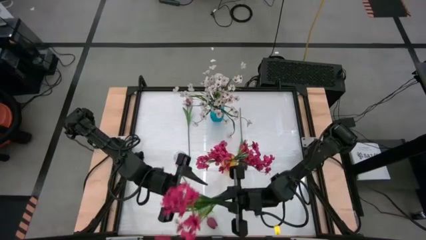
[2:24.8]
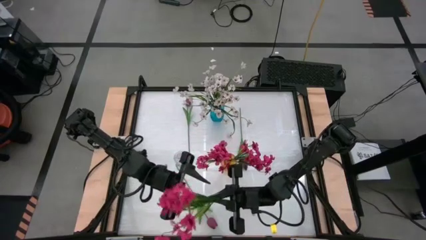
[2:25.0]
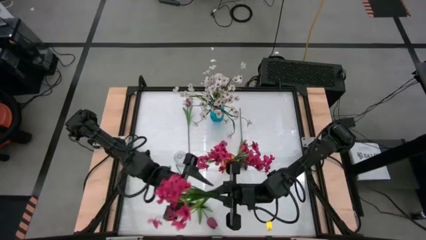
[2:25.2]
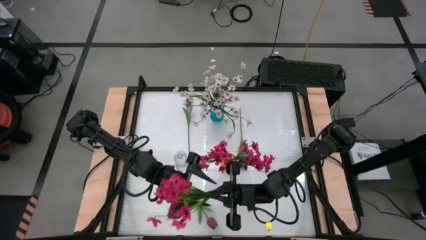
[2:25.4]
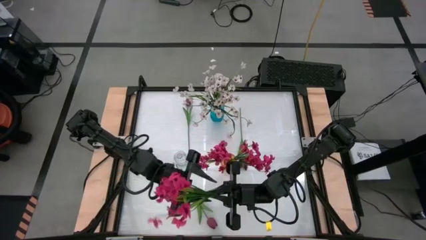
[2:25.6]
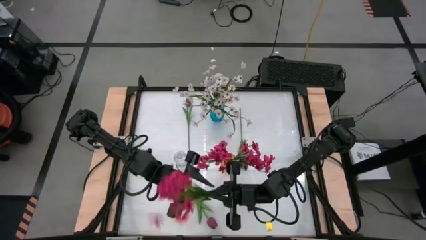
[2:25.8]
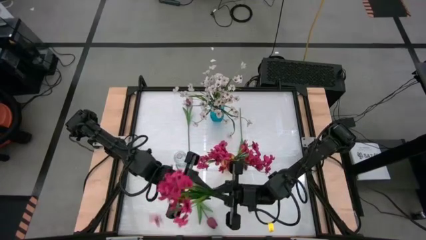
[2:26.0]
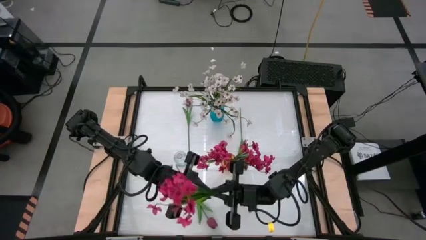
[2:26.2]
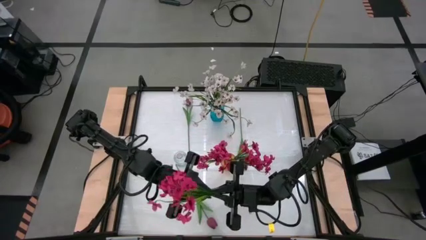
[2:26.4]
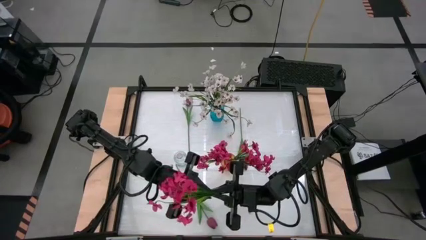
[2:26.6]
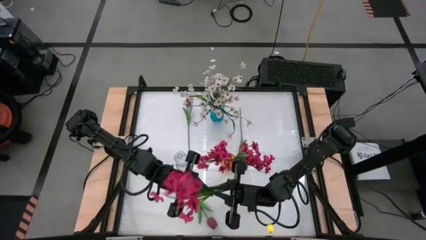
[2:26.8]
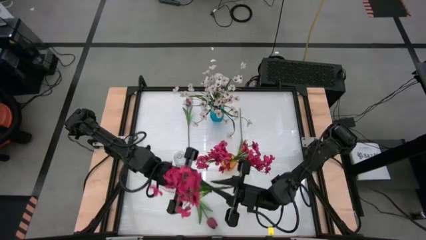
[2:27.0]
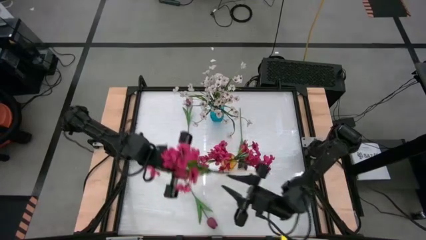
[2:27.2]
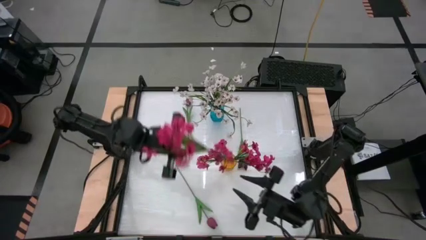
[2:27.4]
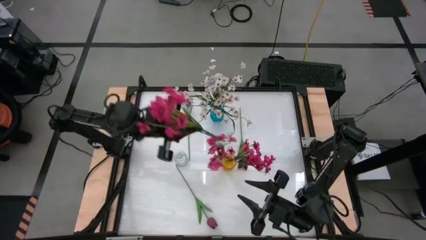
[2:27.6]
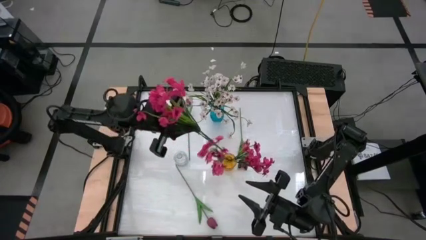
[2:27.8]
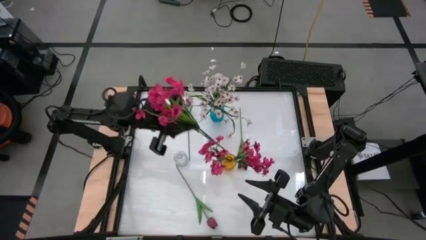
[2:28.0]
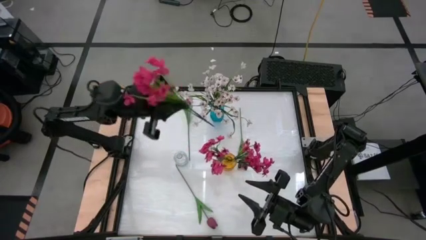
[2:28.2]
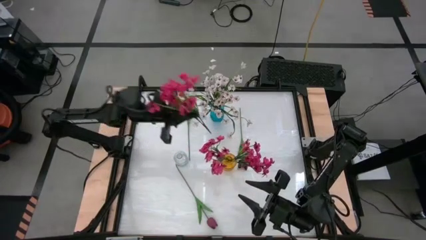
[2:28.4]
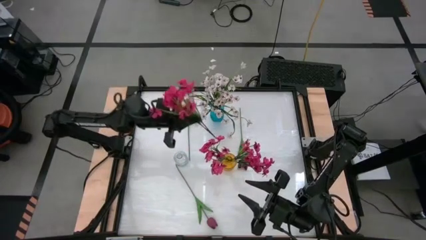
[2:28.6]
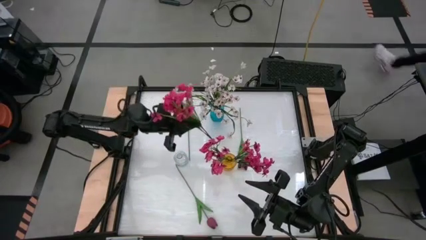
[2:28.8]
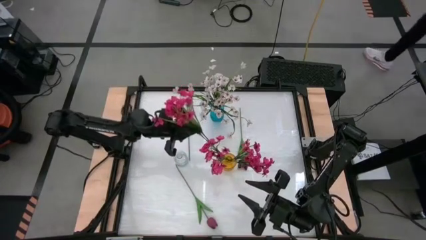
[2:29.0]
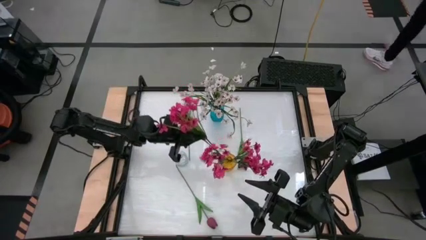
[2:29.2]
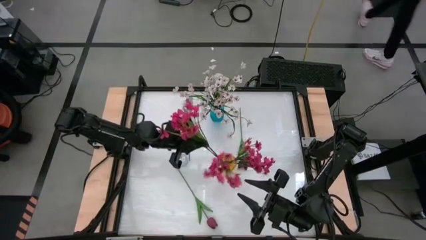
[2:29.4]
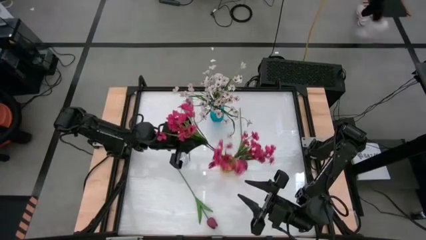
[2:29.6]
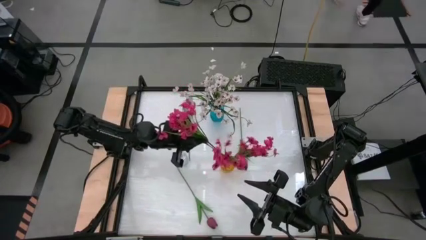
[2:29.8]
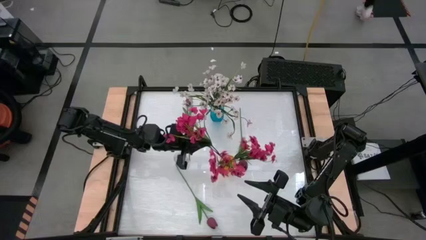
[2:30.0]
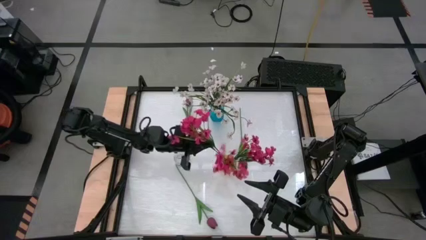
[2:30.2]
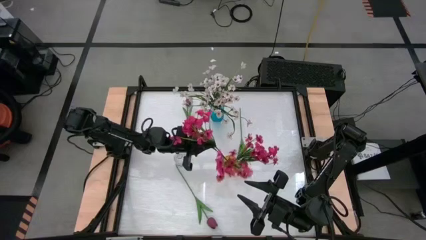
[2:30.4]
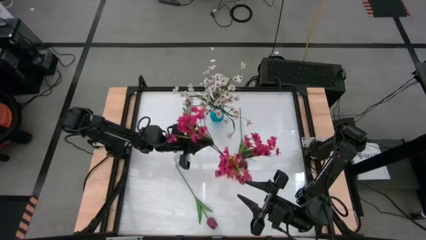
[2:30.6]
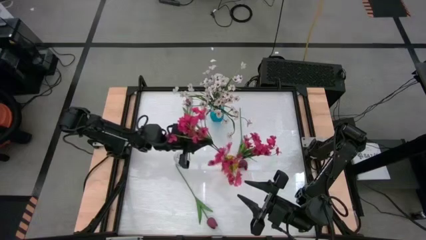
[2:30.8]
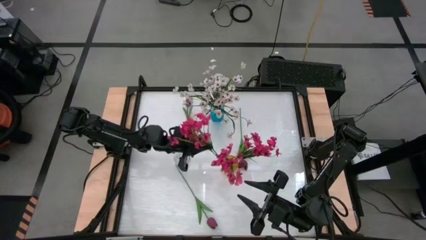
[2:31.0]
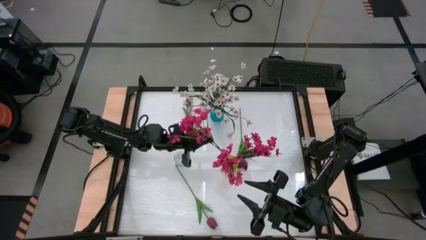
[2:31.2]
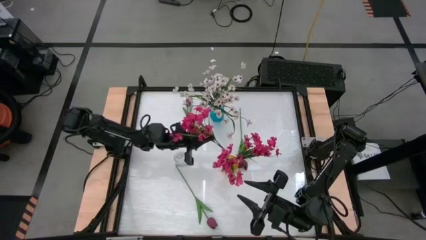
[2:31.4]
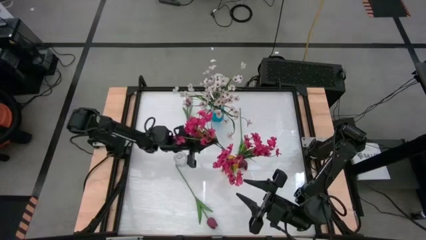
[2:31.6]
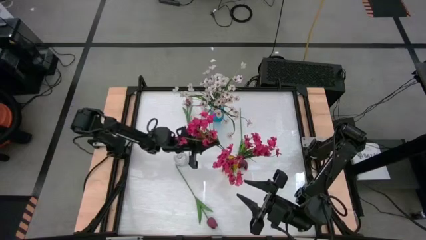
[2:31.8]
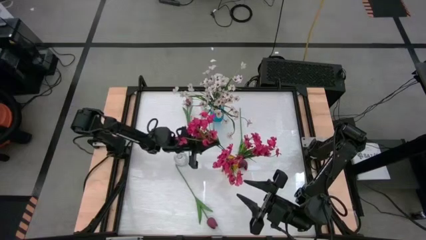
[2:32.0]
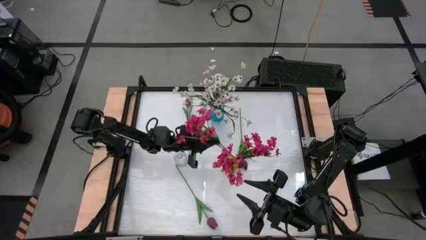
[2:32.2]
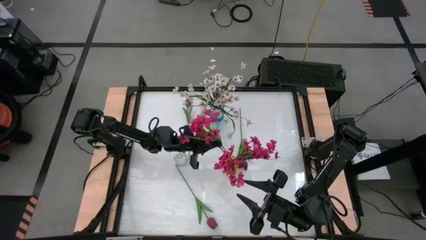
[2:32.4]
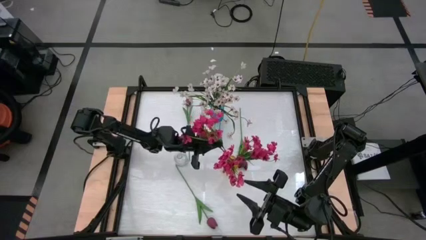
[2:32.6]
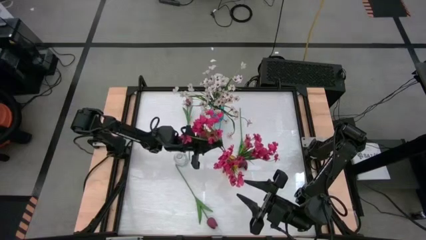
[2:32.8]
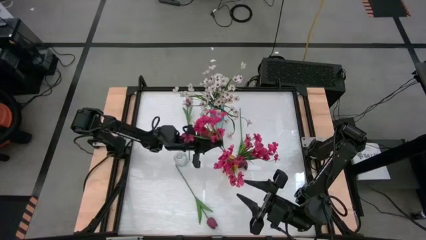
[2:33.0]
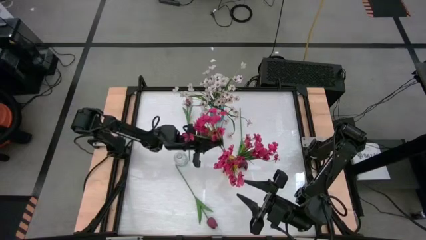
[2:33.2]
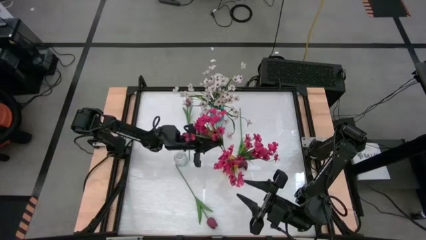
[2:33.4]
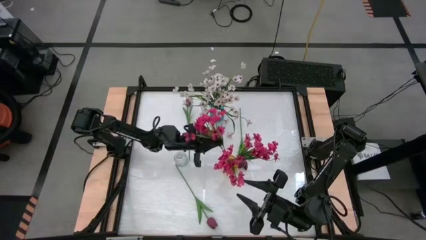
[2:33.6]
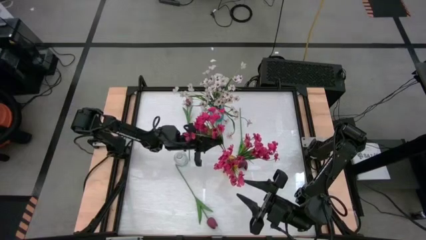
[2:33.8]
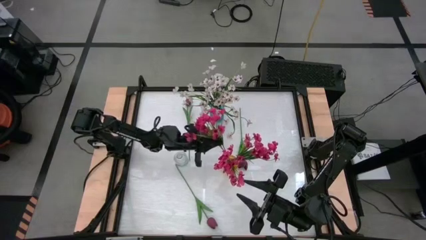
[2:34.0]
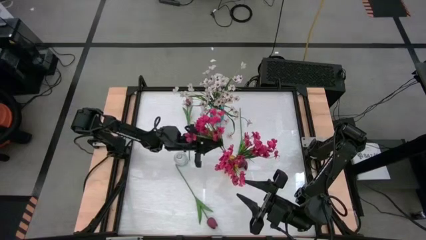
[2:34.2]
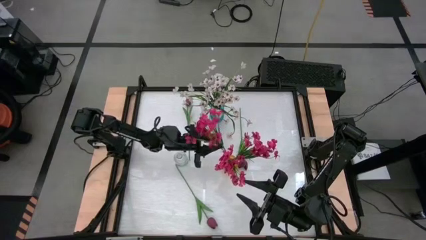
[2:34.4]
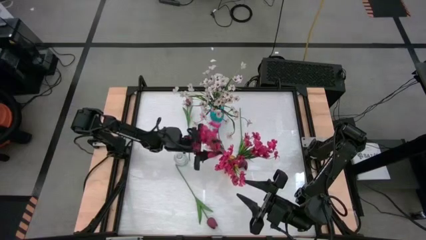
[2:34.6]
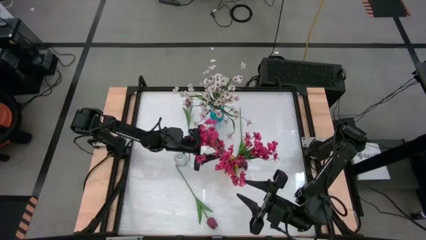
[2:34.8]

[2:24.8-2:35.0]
Task: Sort flowers into vase by color
Put the pink flowers into the yellow vase
